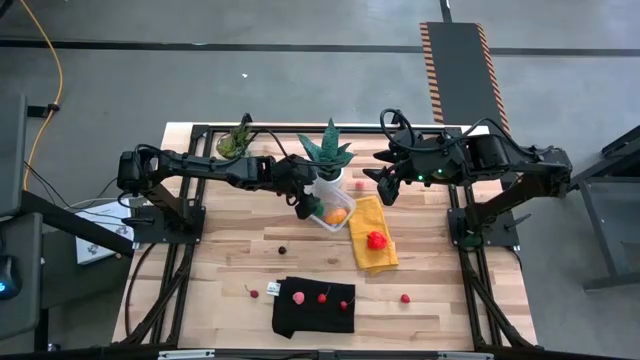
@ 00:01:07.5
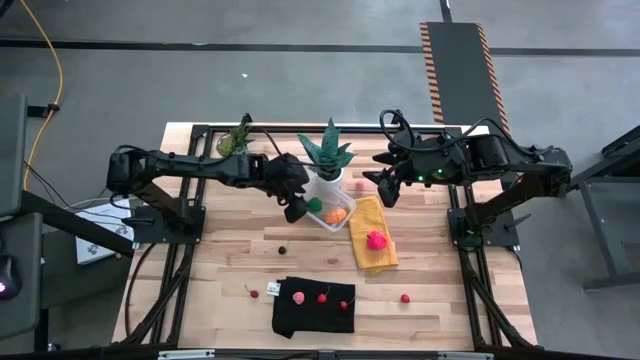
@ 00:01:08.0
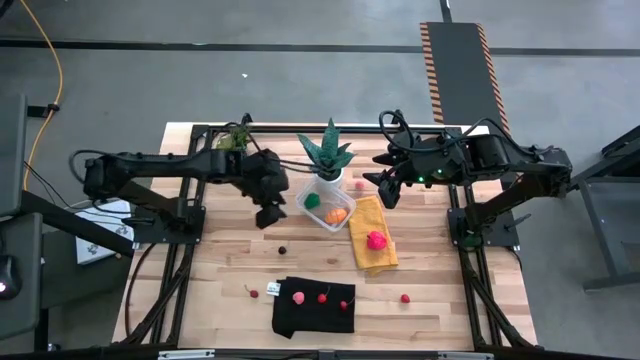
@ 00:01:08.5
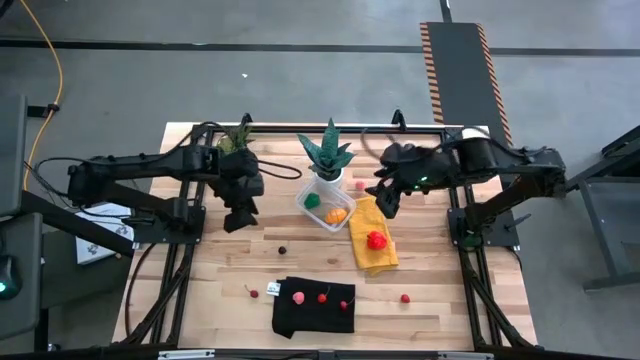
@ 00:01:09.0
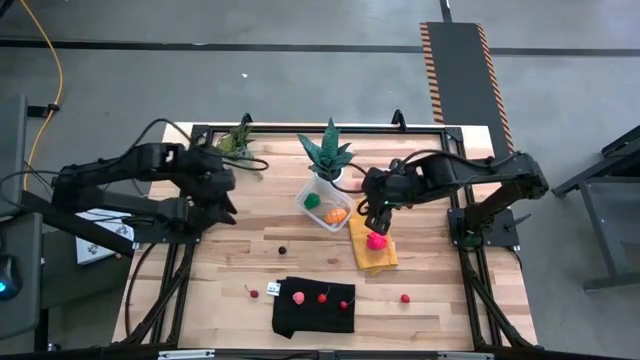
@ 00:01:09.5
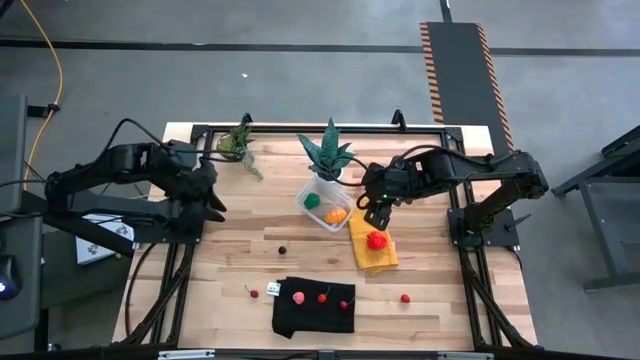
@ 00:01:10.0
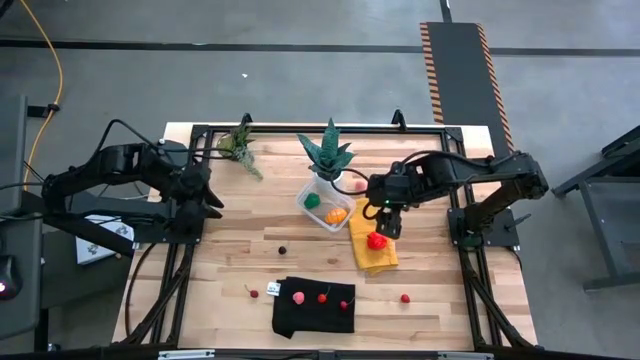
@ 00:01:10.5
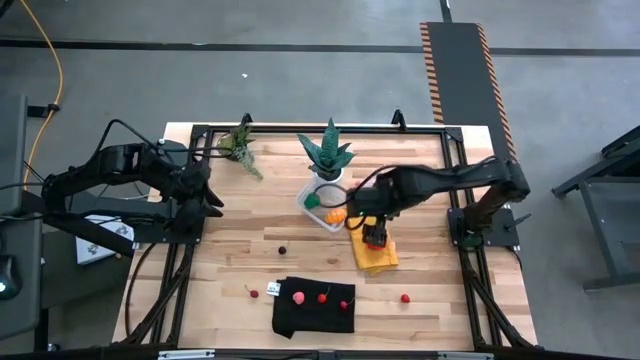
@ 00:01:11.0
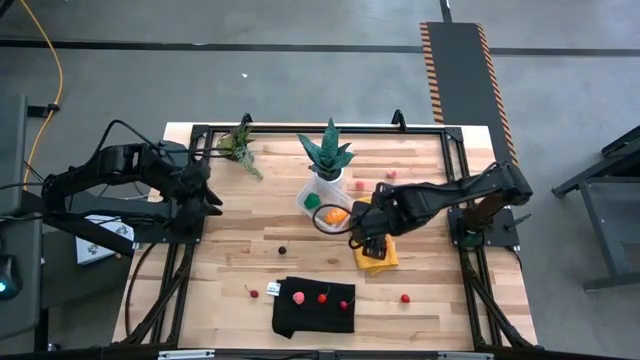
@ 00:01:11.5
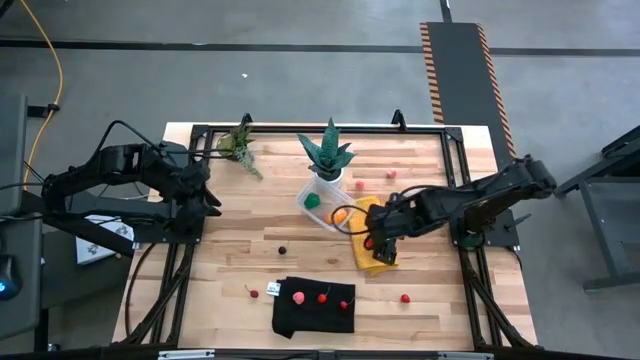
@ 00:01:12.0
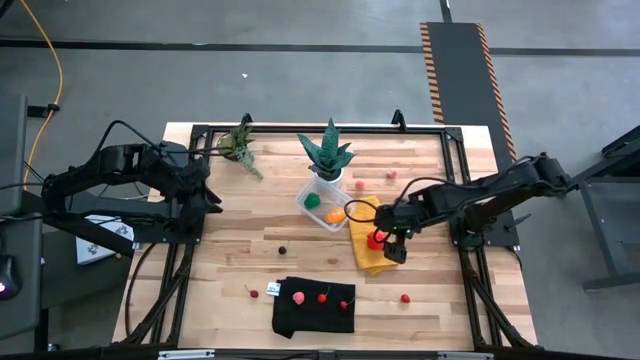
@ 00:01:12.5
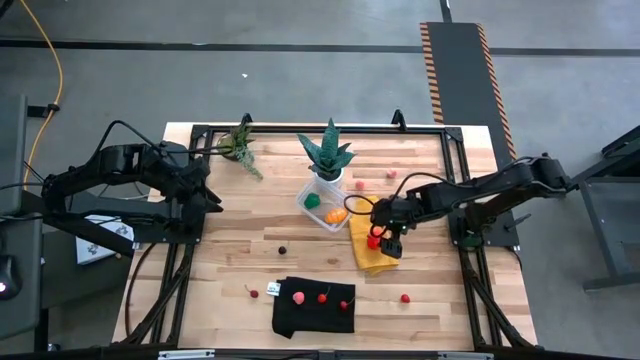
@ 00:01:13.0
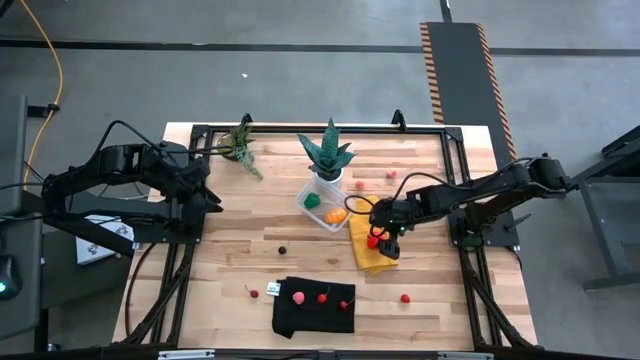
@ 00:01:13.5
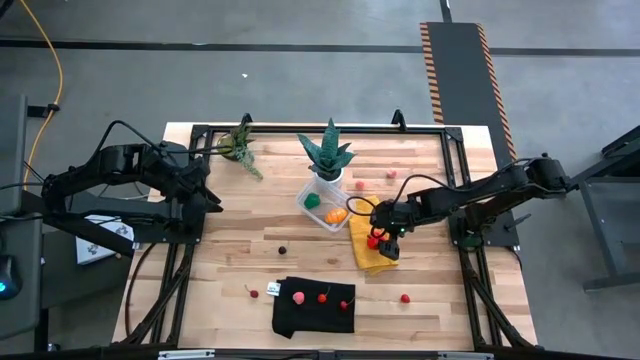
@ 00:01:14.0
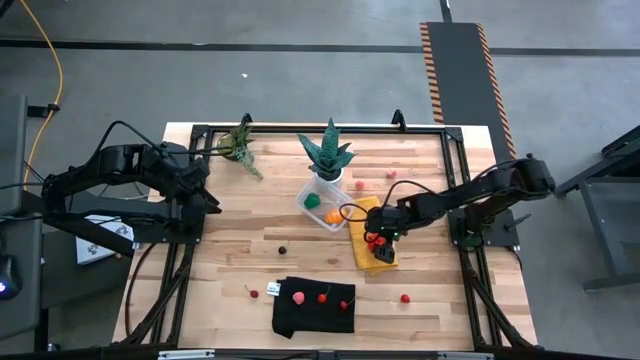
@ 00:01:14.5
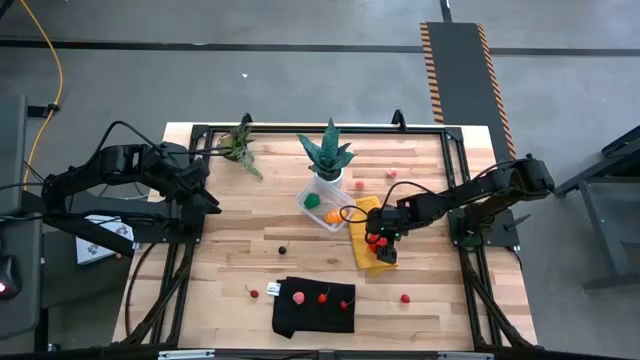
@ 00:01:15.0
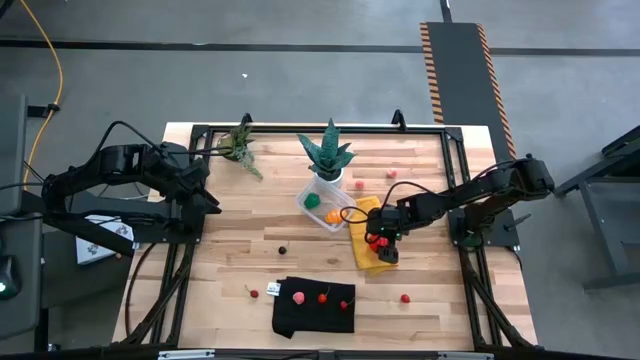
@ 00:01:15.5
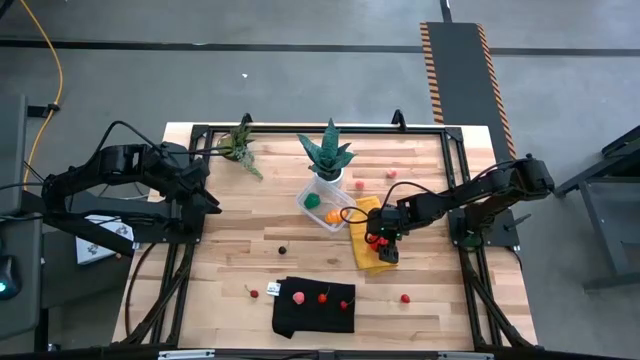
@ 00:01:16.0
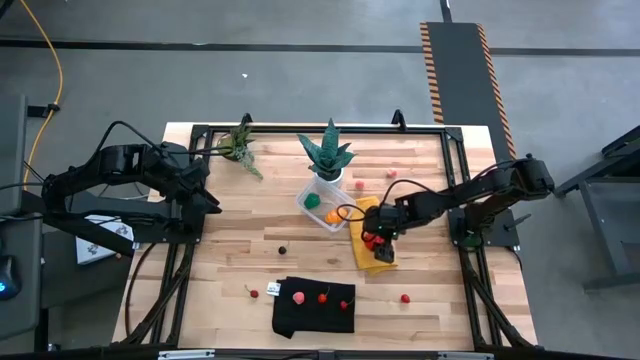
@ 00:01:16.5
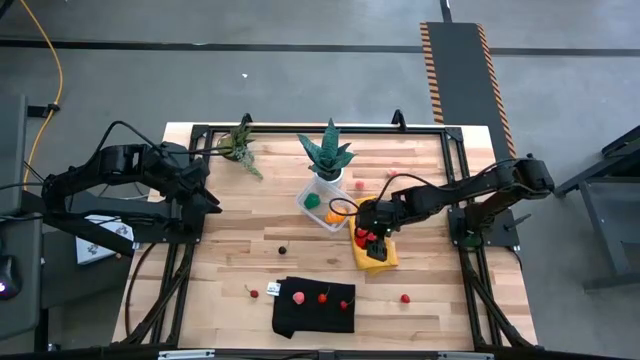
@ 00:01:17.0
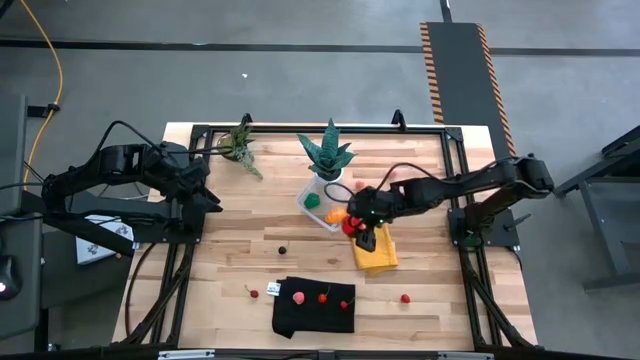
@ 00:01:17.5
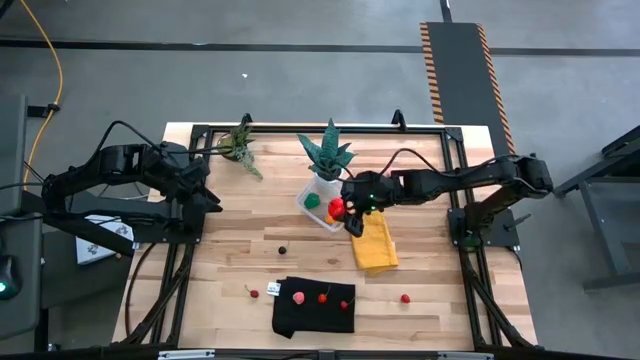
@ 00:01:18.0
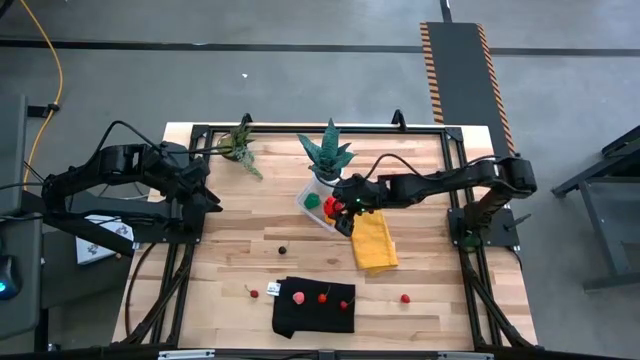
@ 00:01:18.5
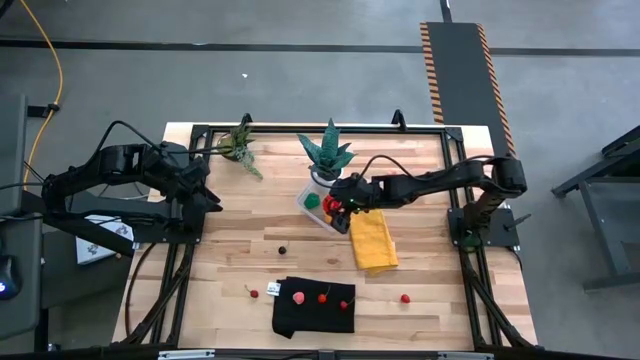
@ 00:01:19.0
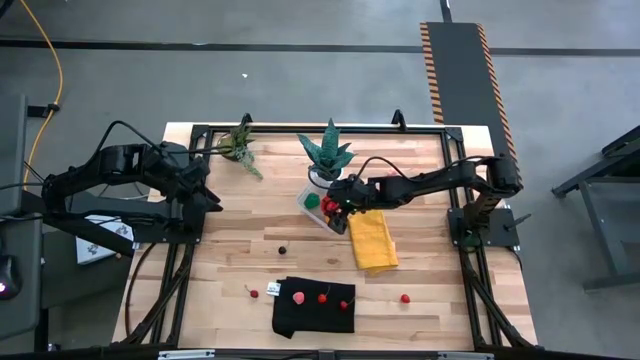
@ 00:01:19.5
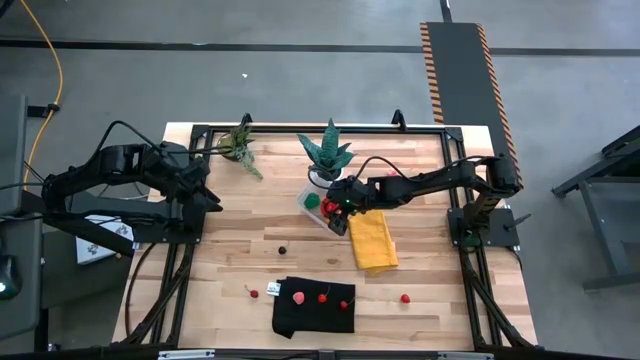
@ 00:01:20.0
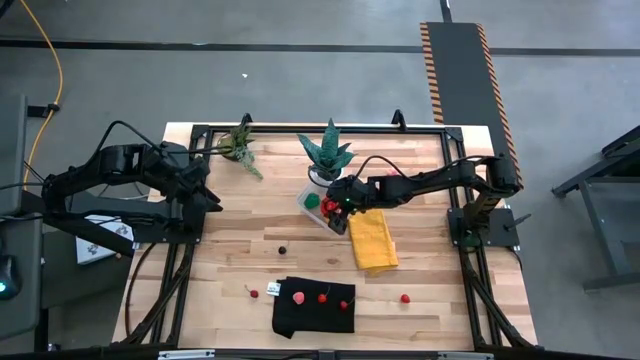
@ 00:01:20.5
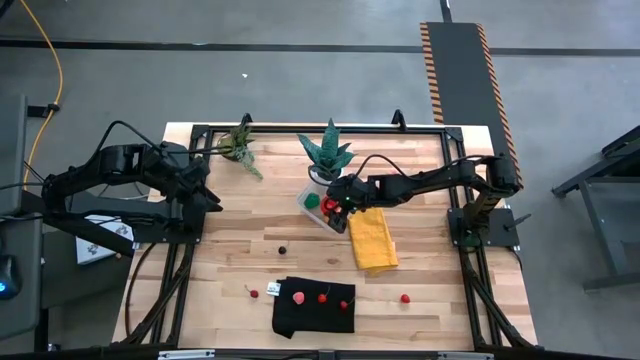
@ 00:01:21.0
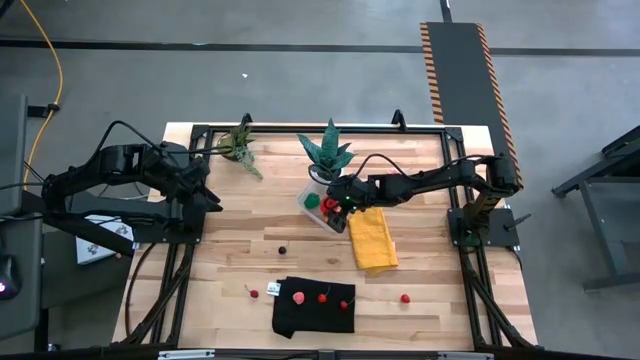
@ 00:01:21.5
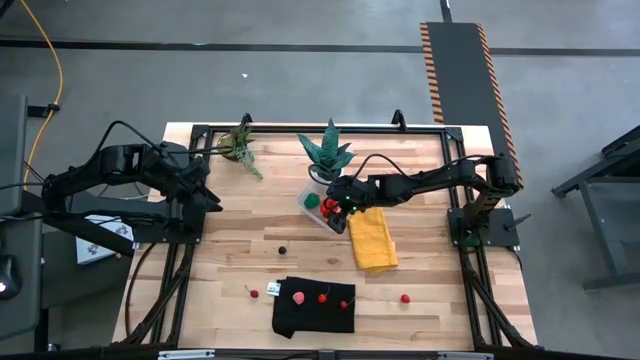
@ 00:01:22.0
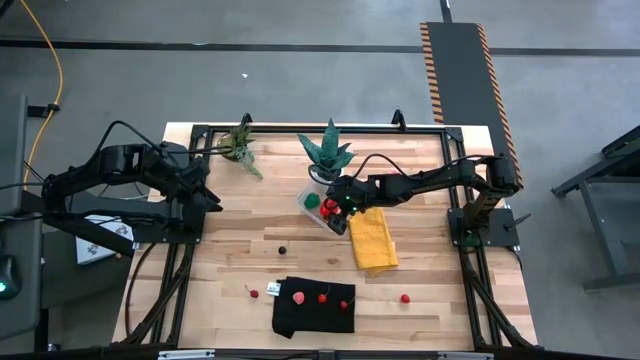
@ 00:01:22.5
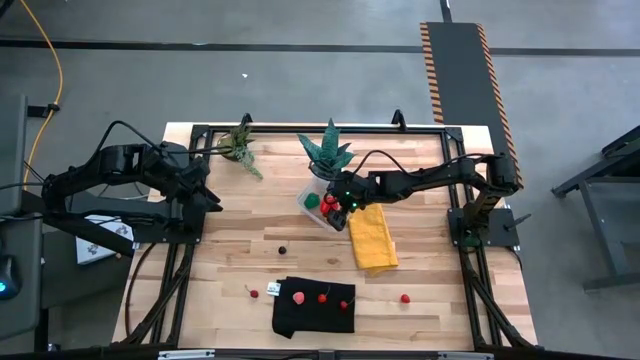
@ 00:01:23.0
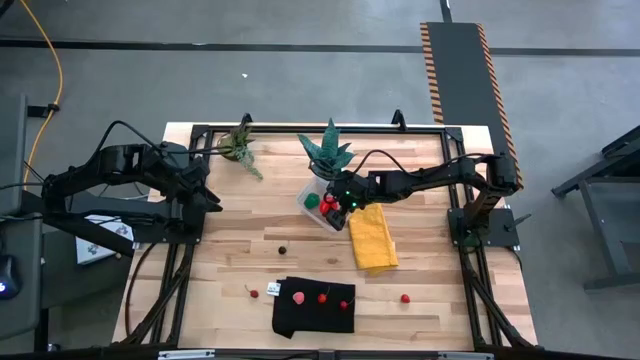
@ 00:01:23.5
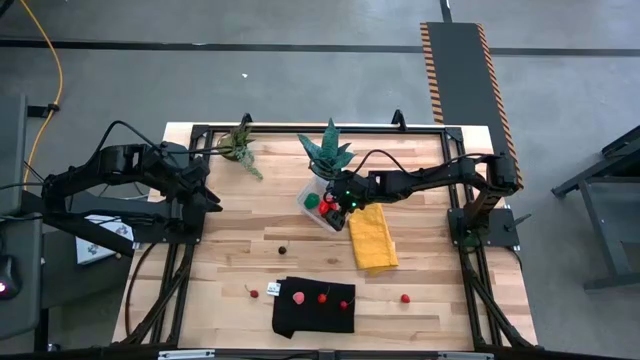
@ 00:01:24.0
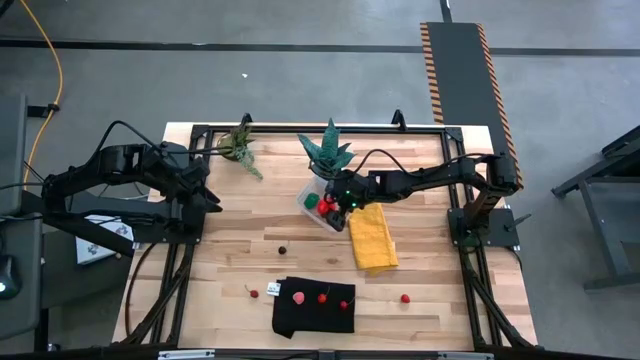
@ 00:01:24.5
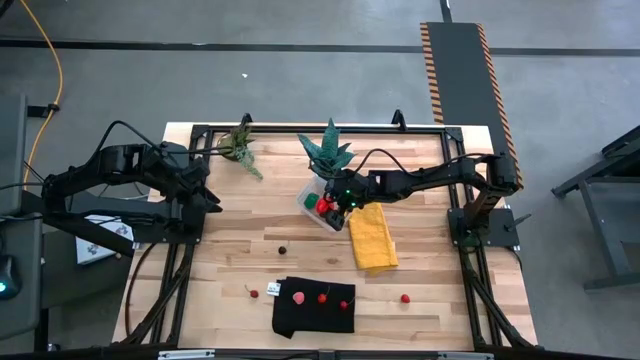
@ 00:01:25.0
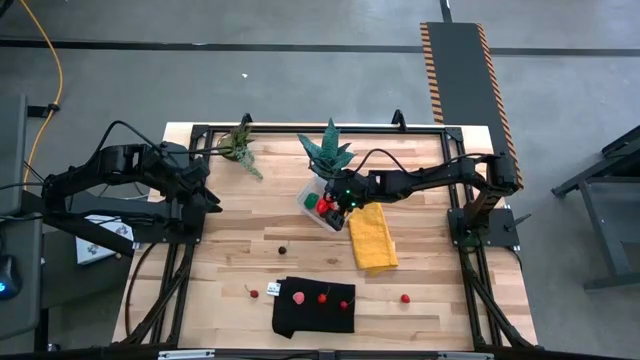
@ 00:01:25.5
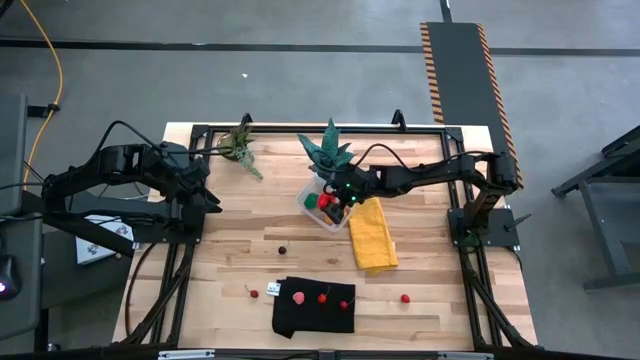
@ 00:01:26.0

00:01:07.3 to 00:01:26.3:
Task: Pick and placing Produce into tupperware
Put the red apple into the transparent container
